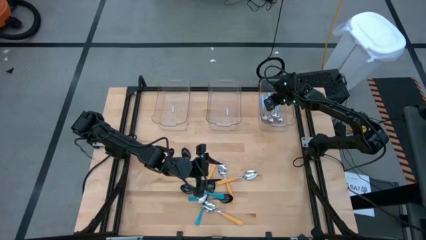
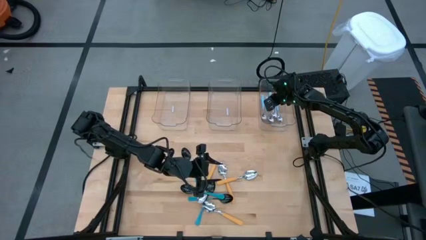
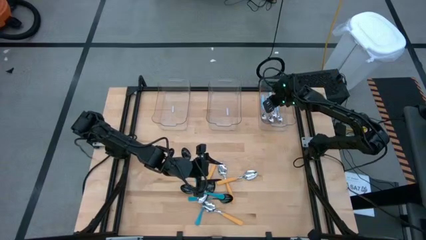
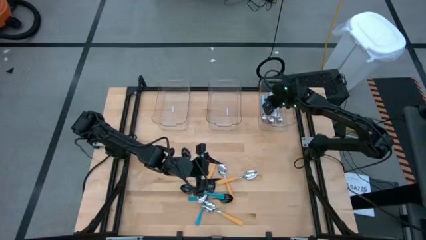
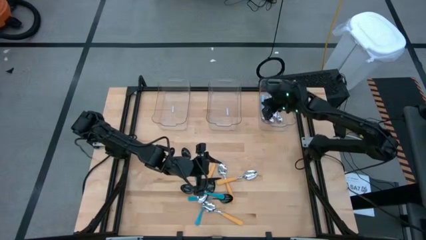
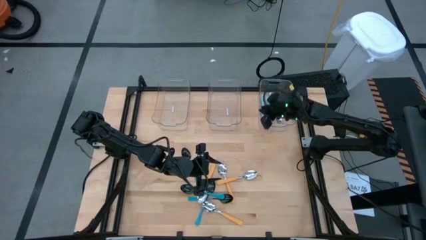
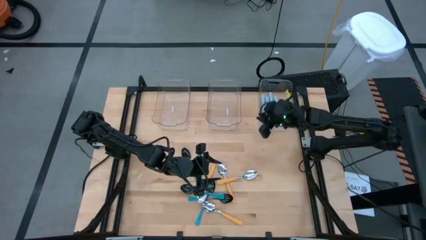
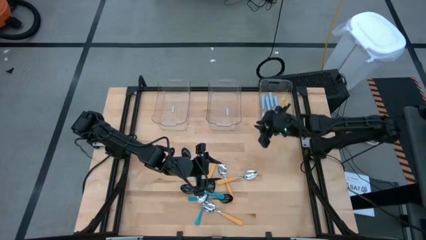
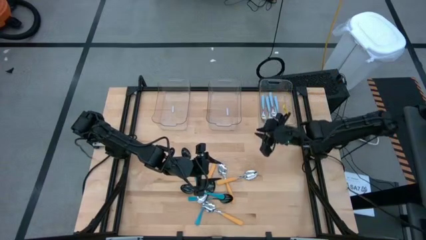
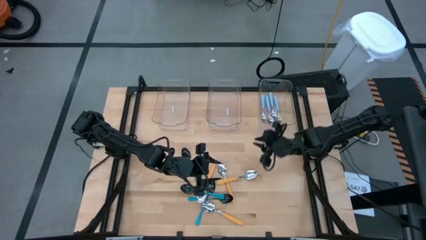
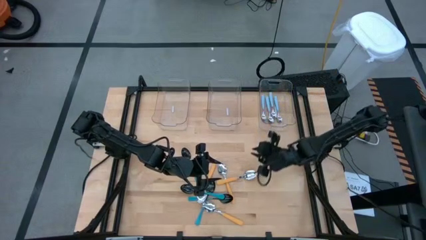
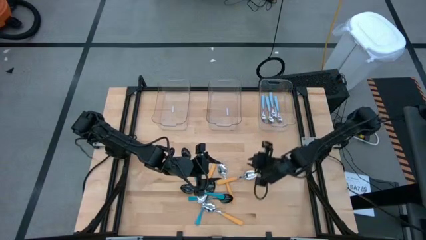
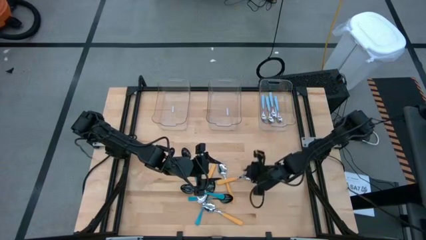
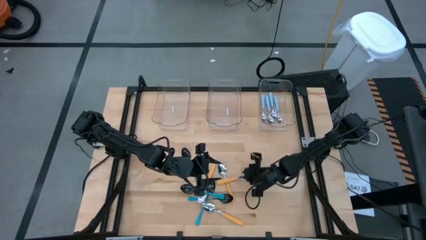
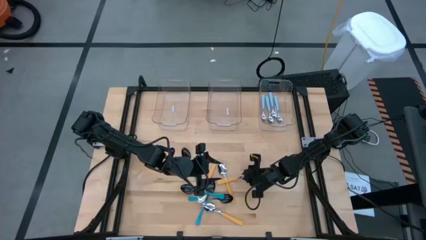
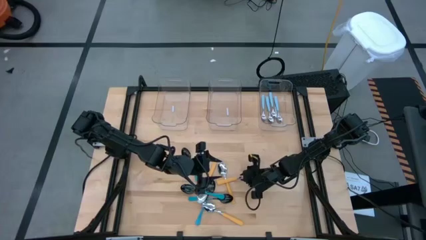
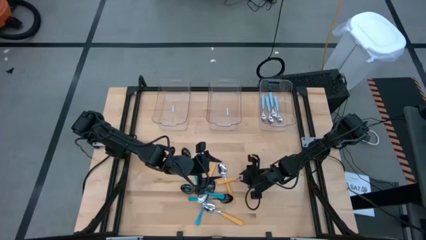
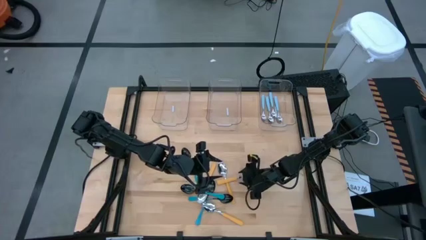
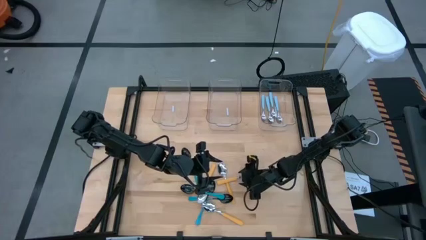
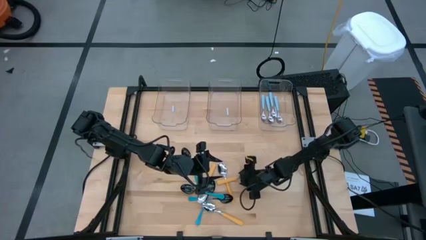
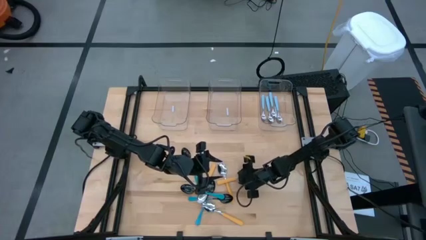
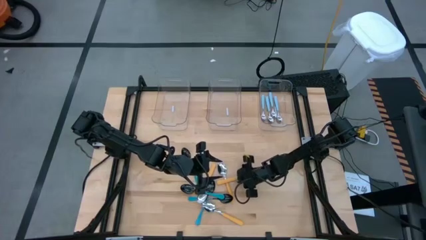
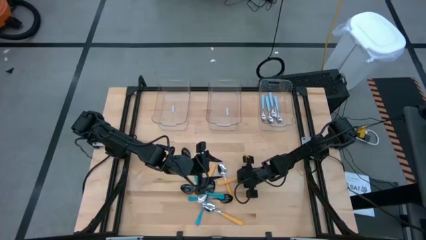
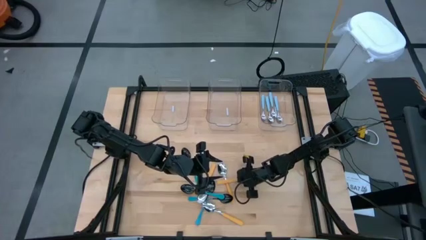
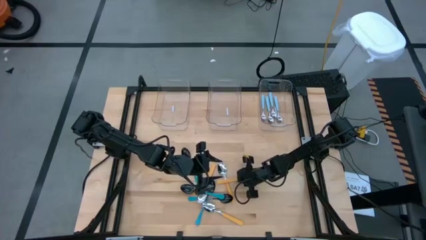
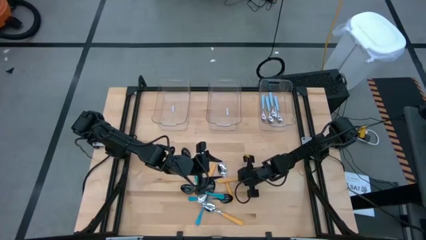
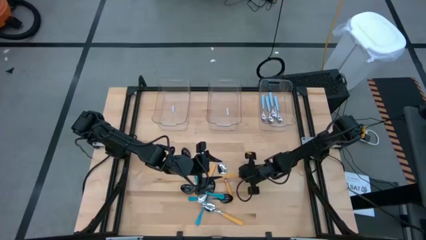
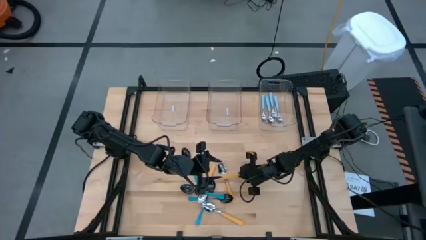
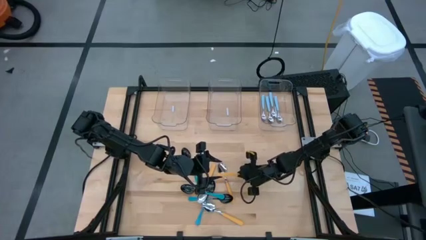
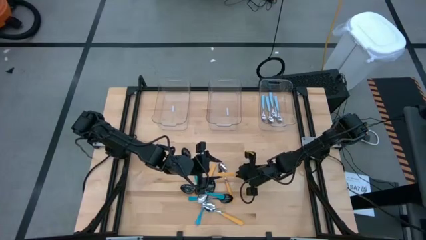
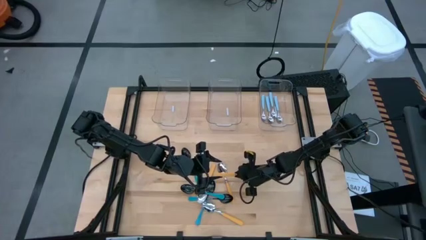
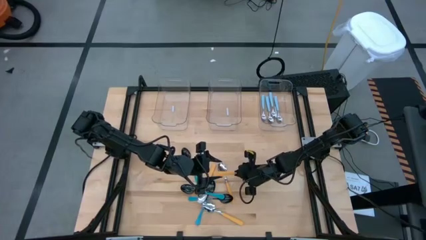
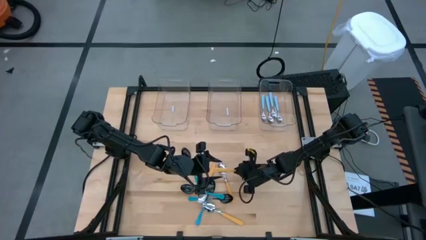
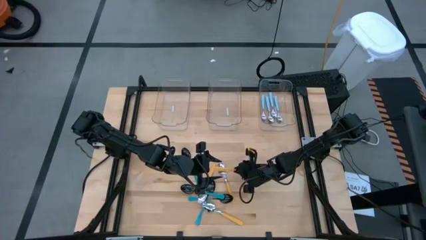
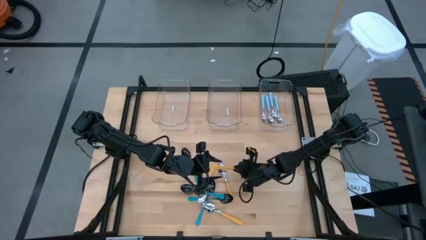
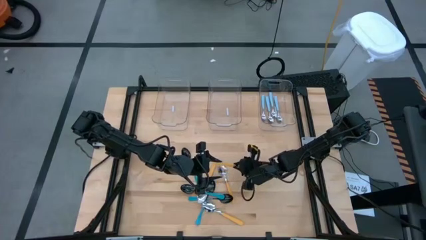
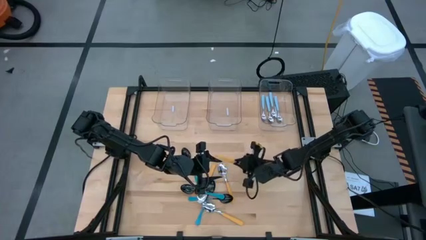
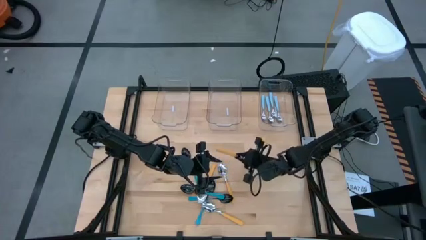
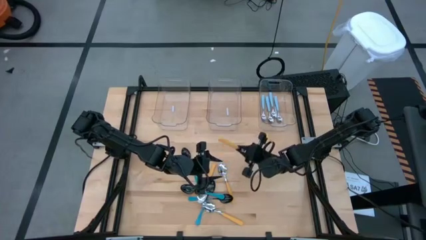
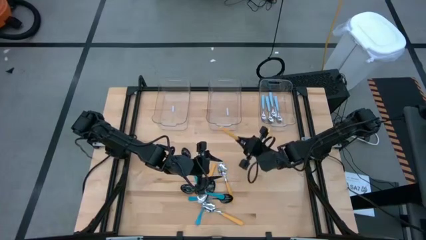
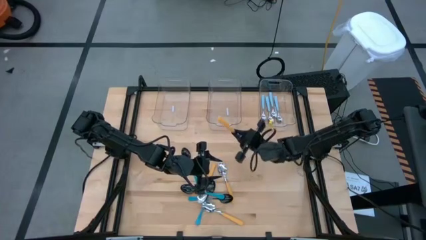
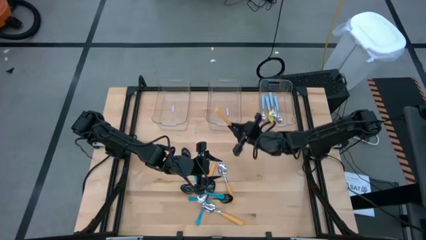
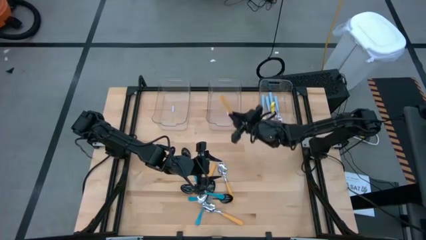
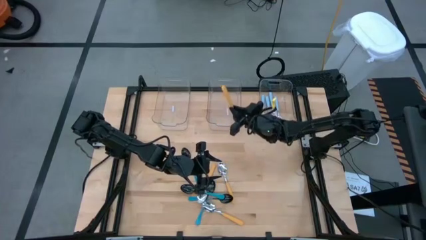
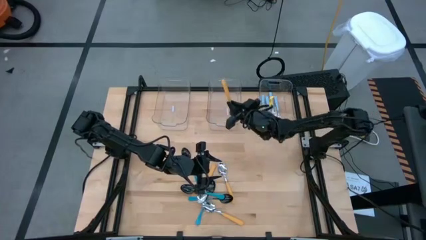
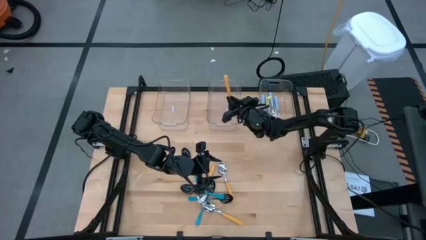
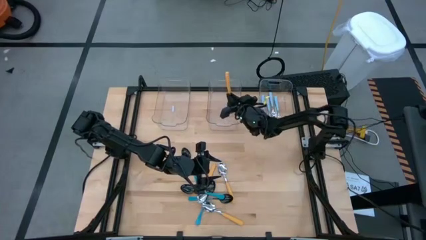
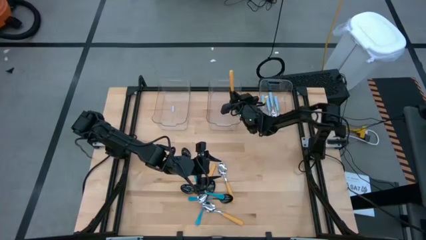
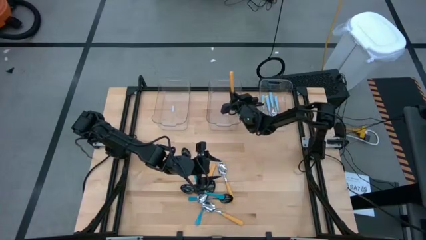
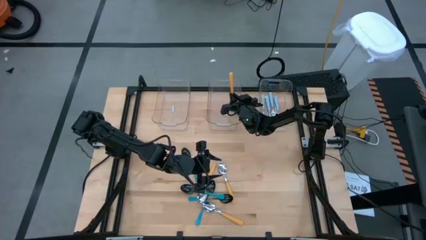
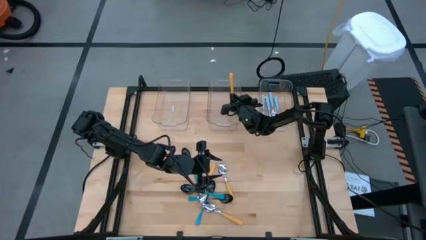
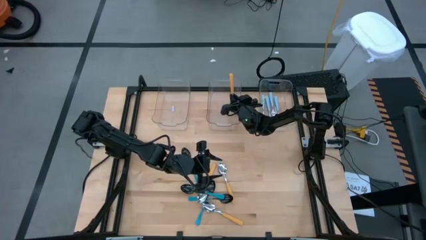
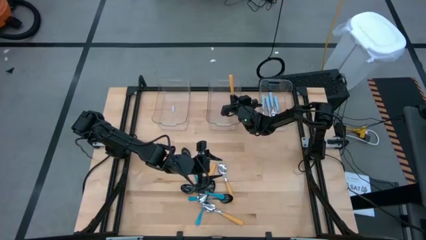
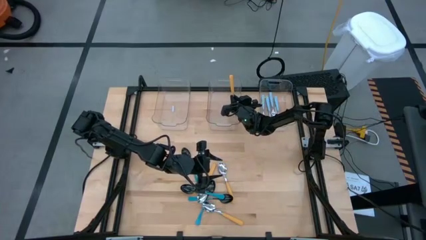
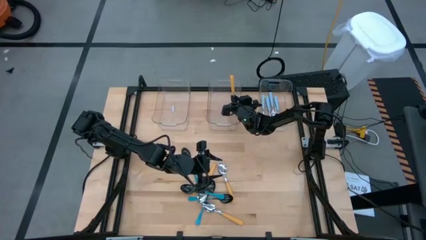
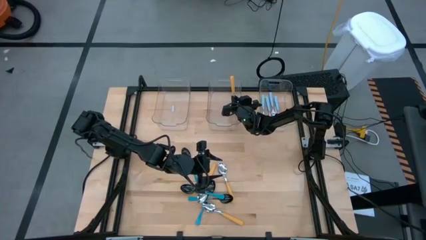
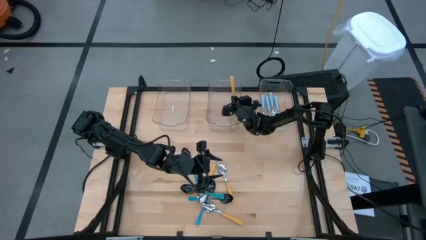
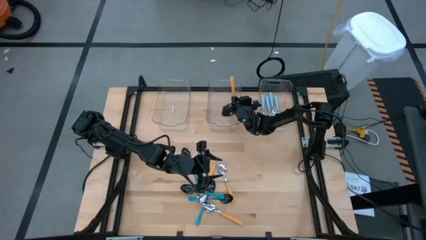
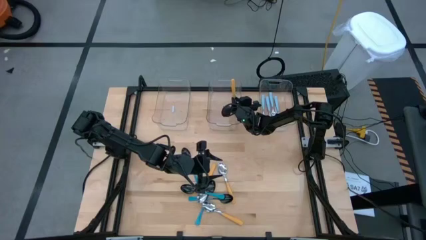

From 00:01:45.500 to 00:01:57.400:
Task: Sort silverware by color (type)
Put the brown spoon into the middle transparent bin

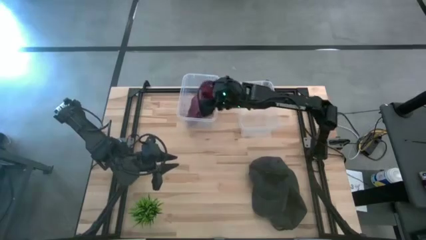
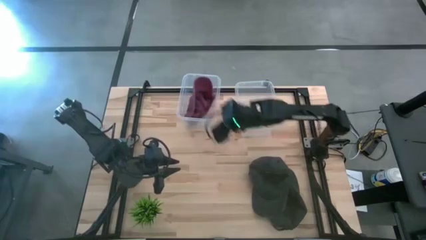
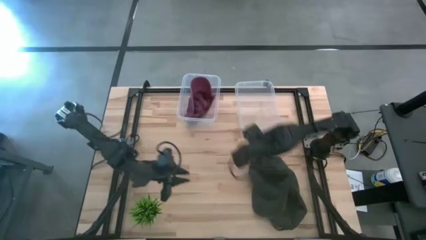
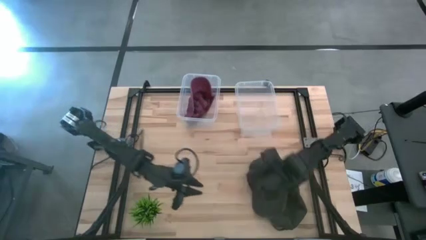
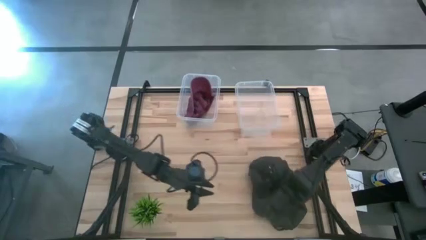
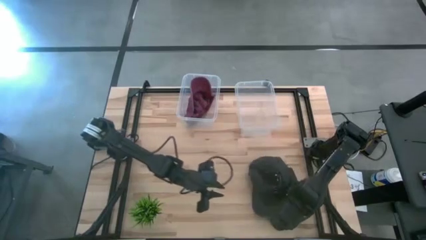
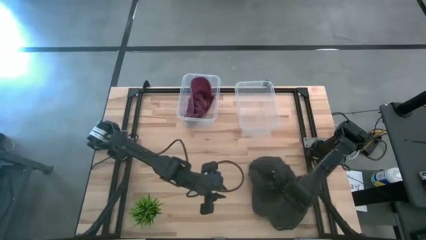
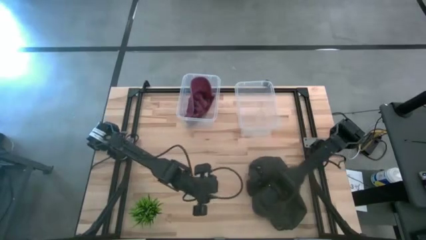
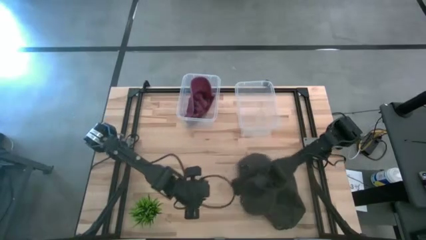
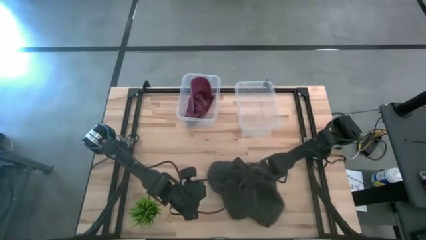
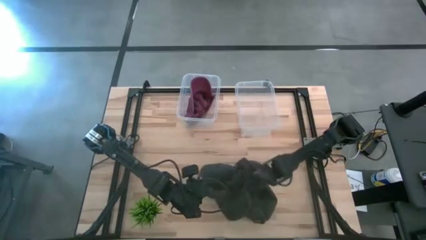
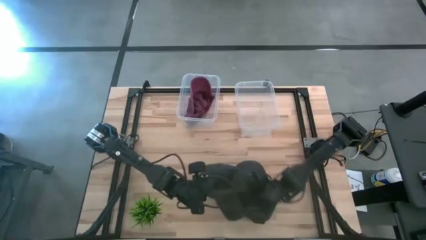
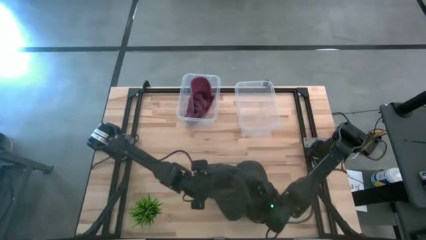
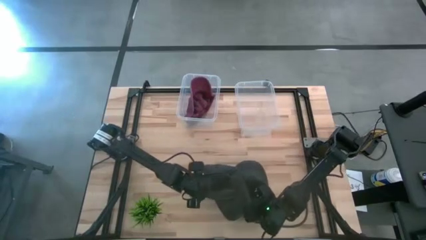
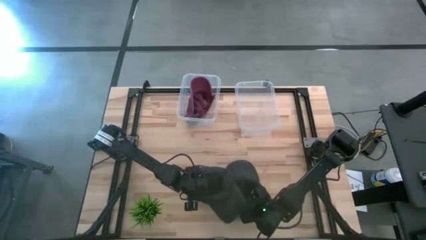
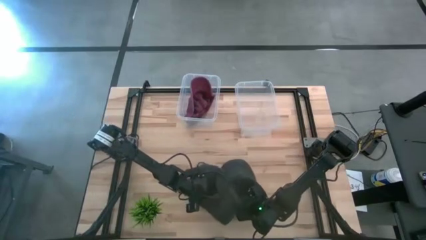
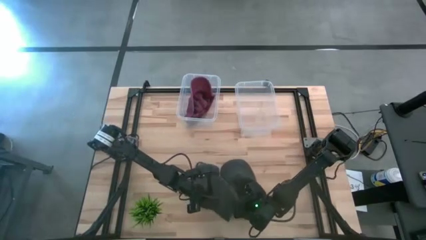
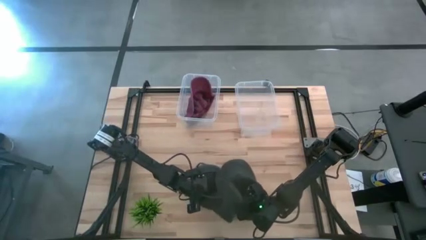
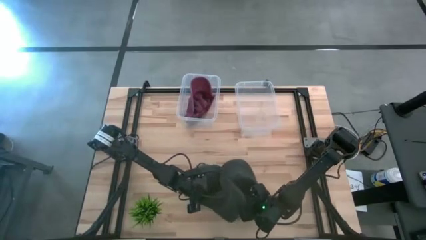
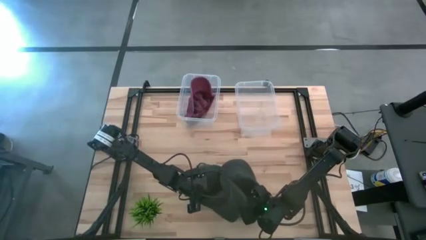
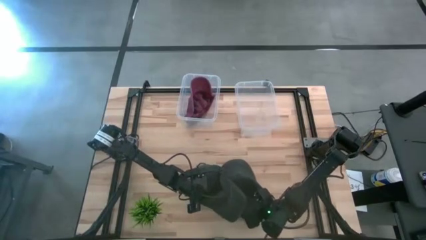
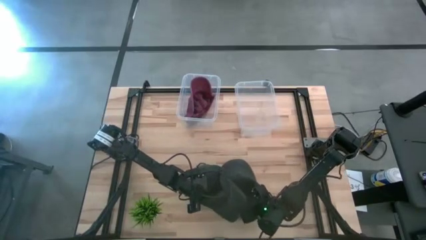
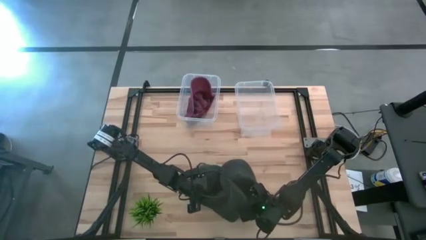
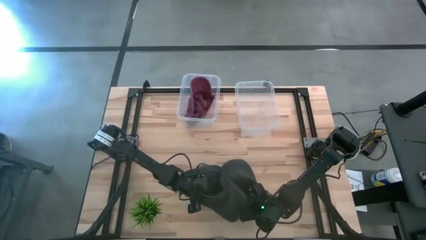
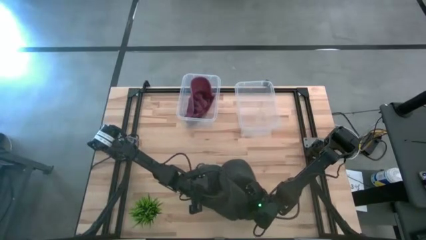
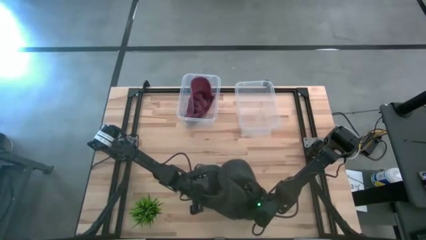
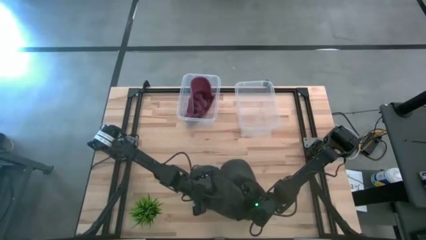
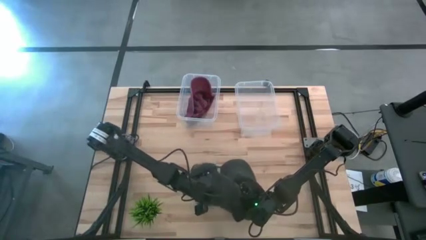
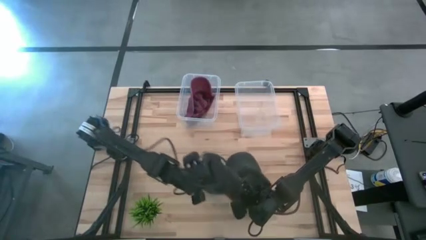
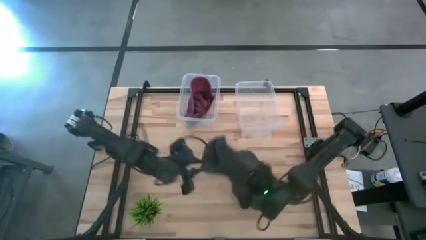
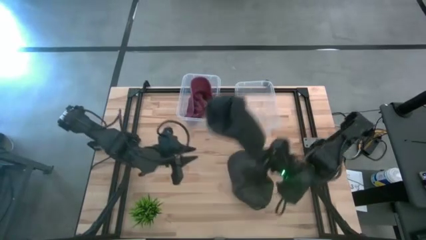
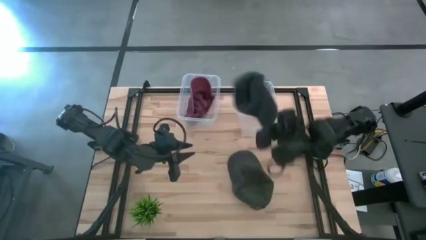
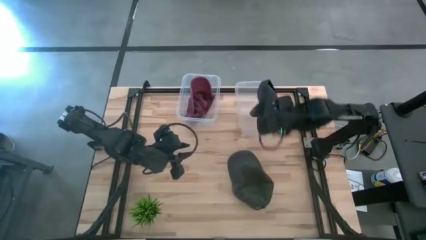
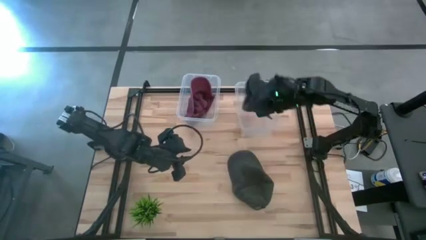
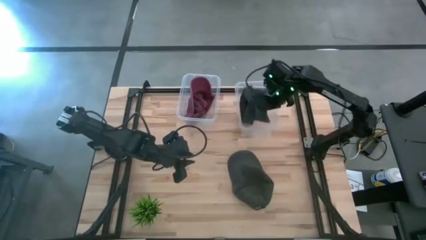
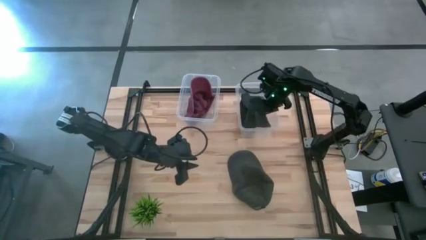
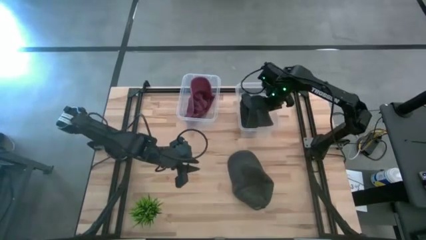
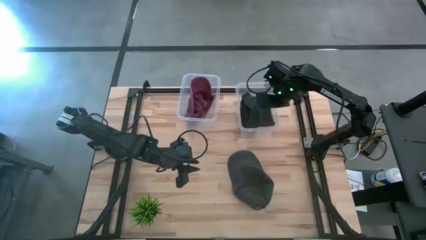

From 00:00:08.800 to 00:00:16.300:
Task: Pick & Place hat
Put the left black cap into the right transparent bin
